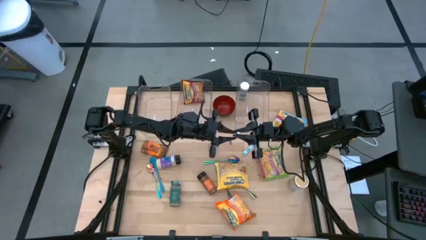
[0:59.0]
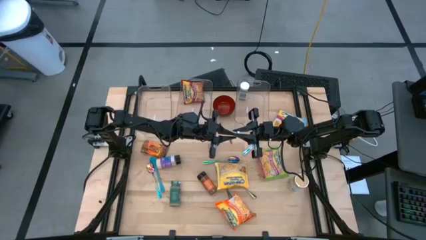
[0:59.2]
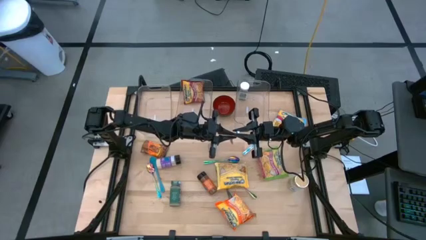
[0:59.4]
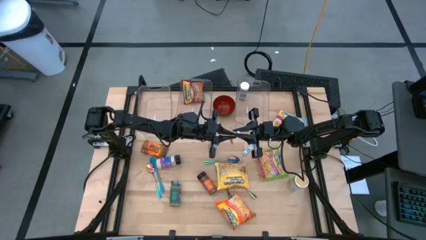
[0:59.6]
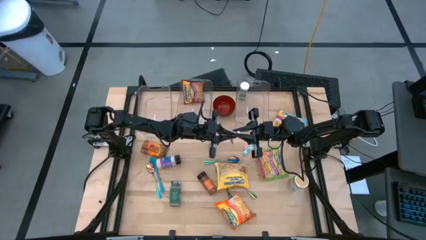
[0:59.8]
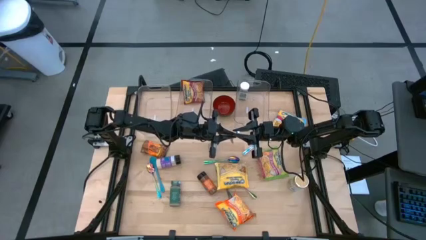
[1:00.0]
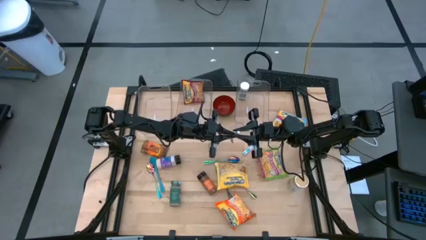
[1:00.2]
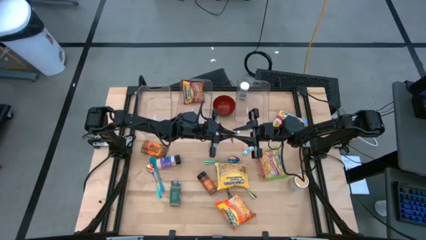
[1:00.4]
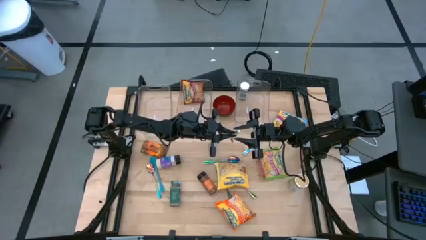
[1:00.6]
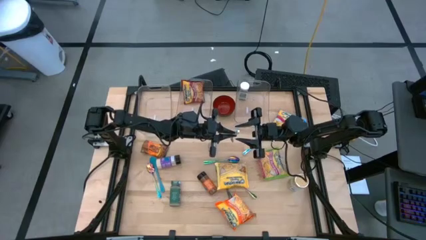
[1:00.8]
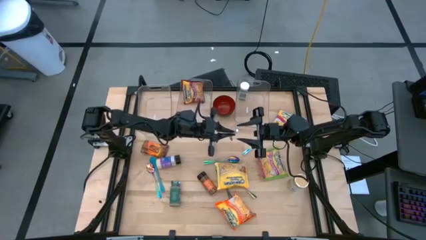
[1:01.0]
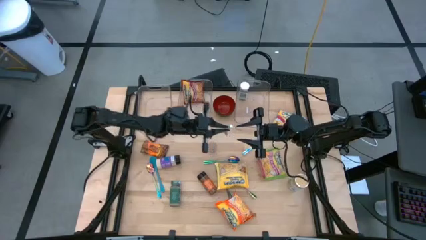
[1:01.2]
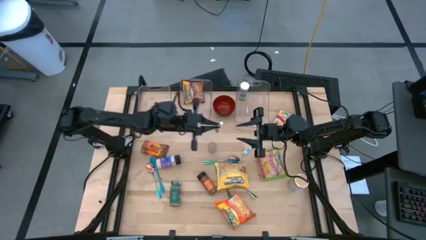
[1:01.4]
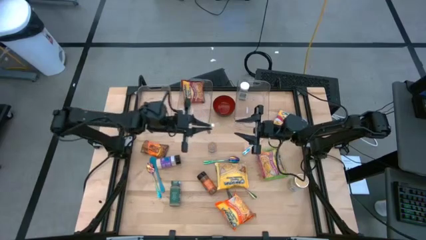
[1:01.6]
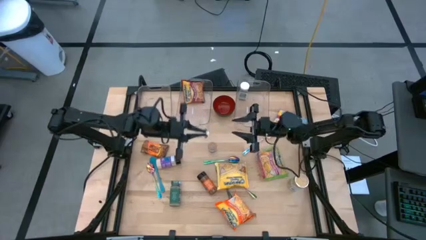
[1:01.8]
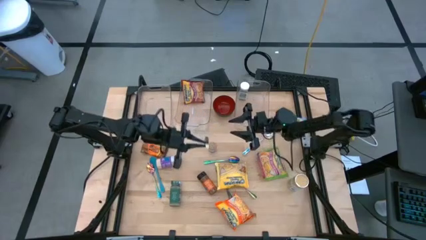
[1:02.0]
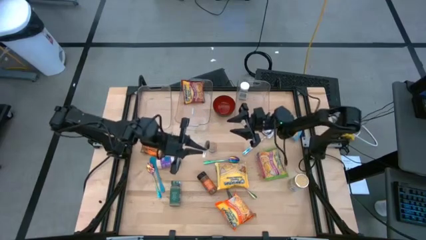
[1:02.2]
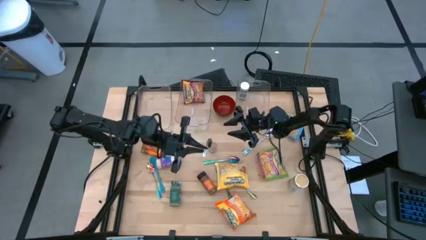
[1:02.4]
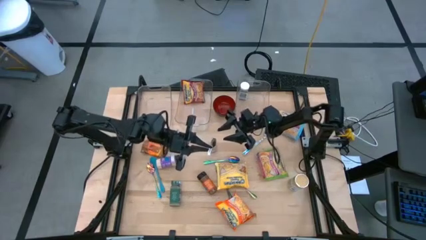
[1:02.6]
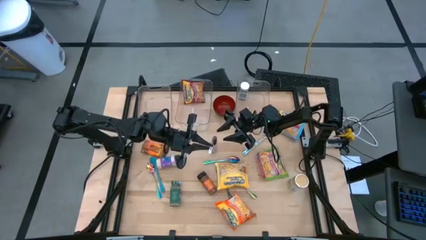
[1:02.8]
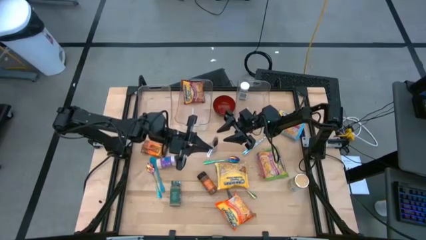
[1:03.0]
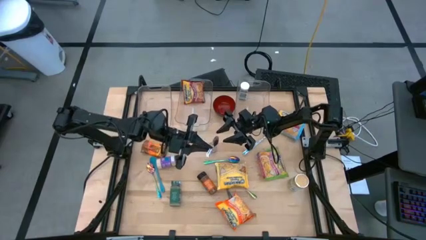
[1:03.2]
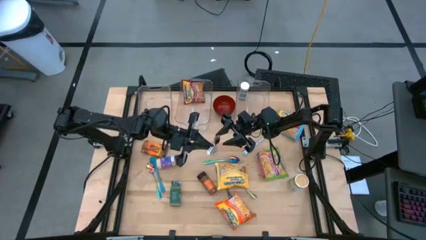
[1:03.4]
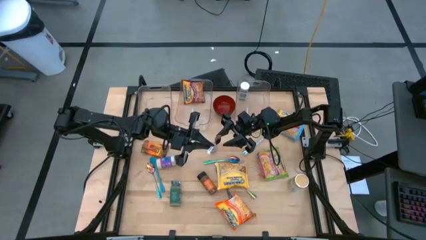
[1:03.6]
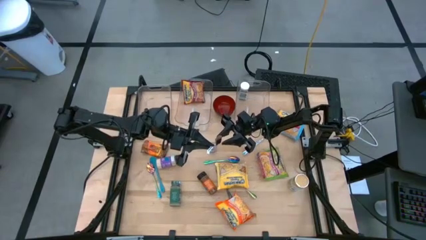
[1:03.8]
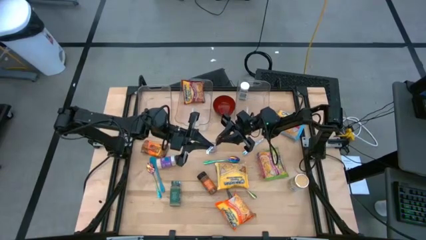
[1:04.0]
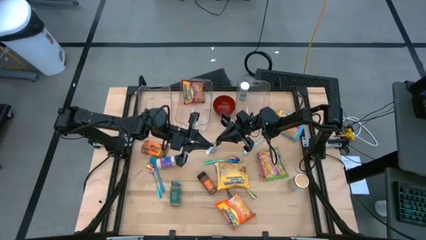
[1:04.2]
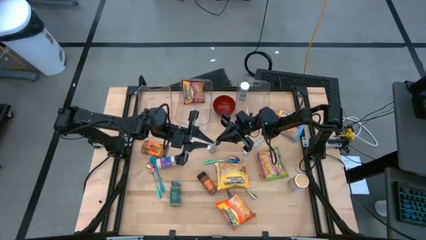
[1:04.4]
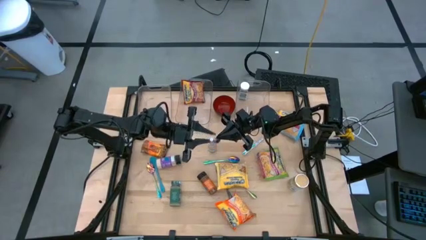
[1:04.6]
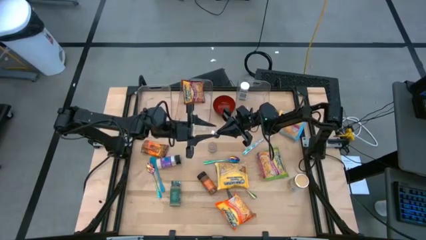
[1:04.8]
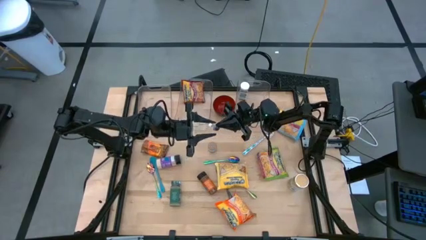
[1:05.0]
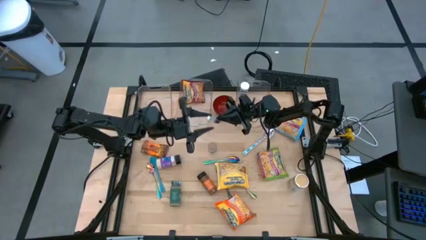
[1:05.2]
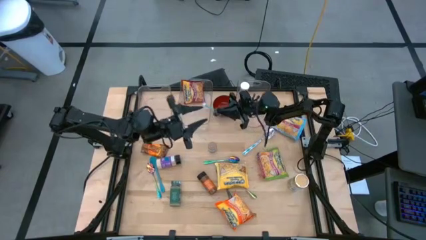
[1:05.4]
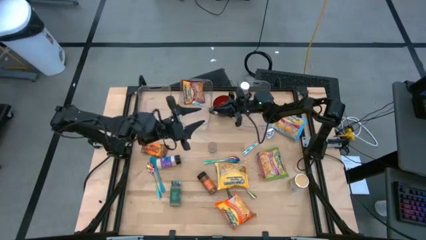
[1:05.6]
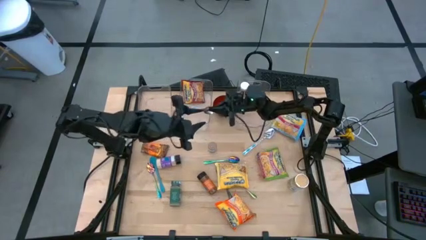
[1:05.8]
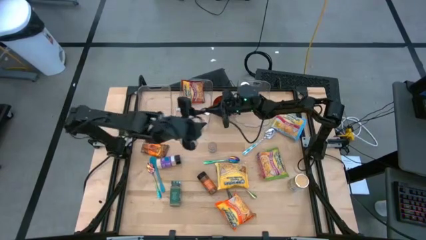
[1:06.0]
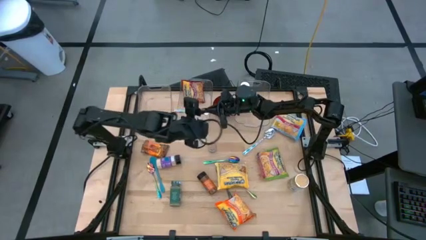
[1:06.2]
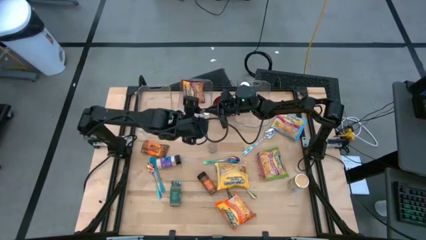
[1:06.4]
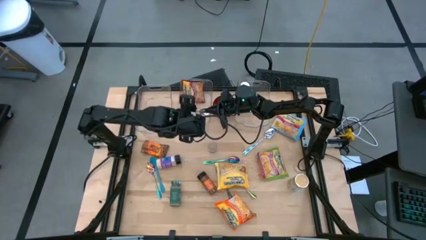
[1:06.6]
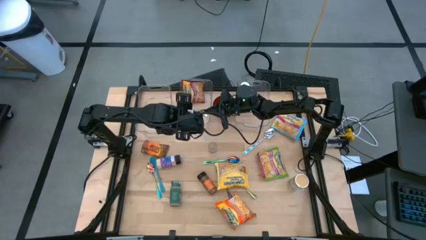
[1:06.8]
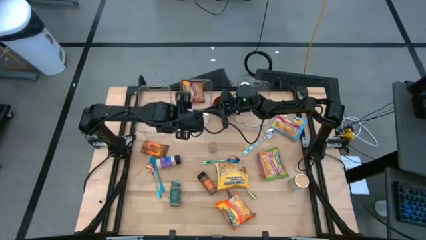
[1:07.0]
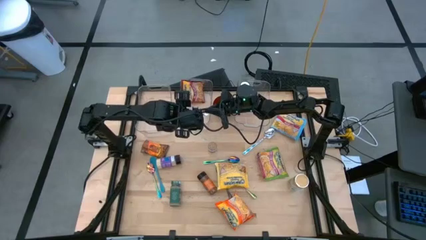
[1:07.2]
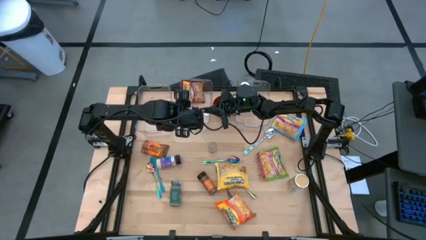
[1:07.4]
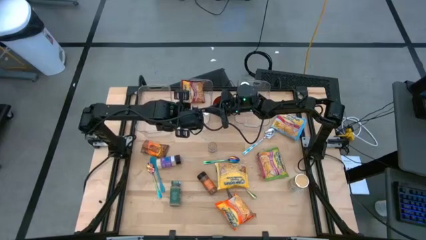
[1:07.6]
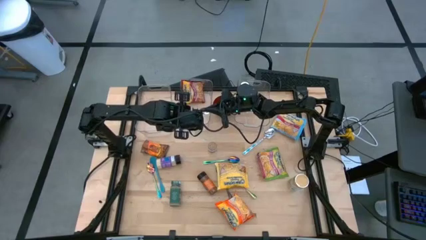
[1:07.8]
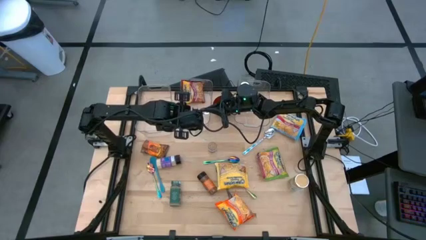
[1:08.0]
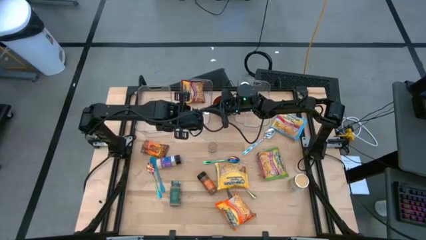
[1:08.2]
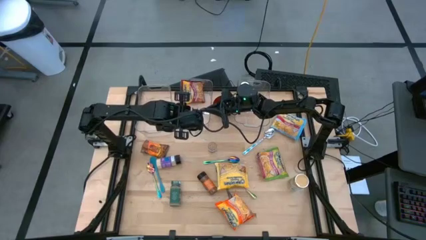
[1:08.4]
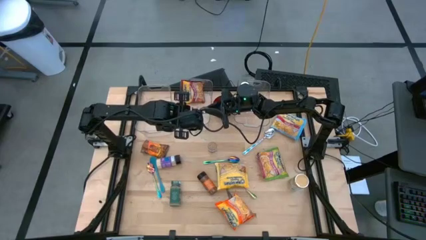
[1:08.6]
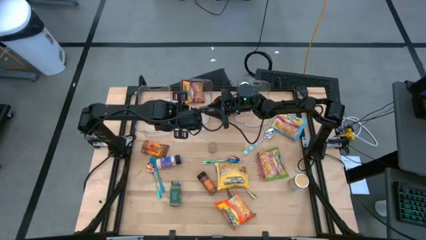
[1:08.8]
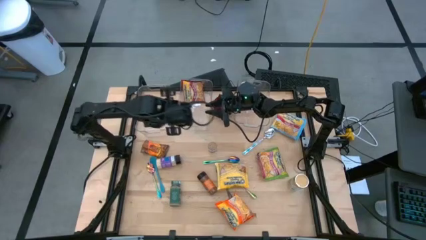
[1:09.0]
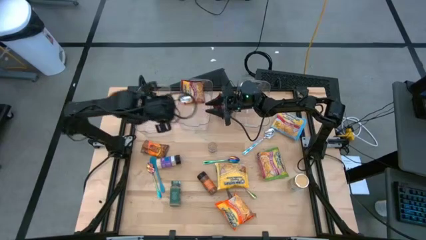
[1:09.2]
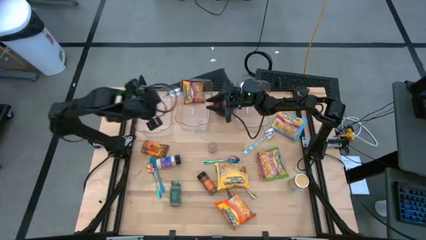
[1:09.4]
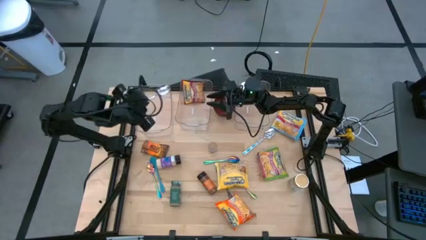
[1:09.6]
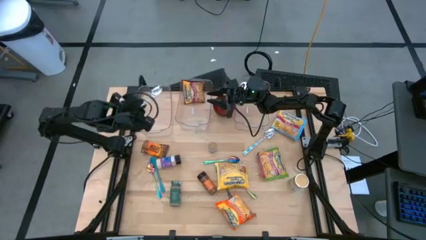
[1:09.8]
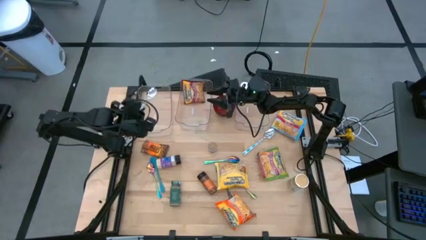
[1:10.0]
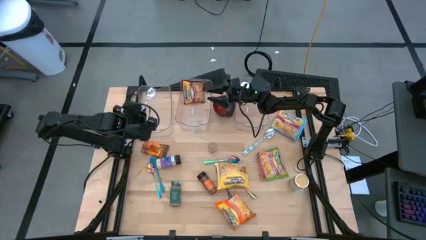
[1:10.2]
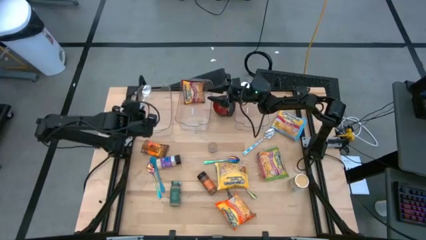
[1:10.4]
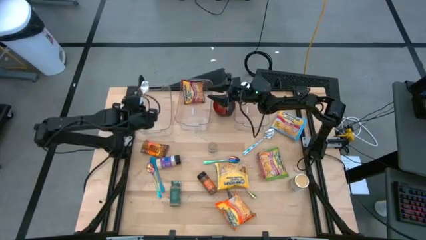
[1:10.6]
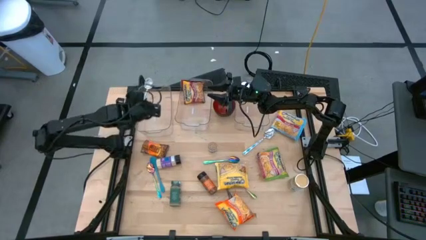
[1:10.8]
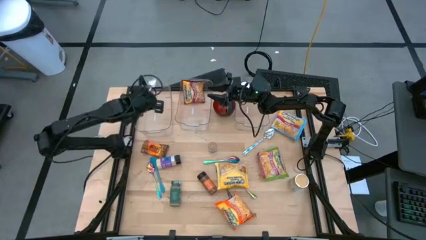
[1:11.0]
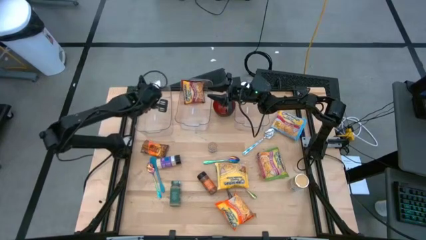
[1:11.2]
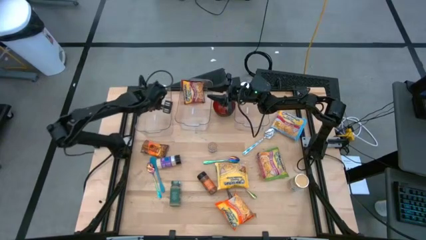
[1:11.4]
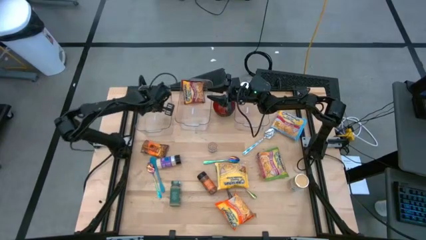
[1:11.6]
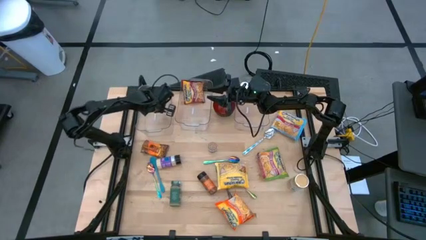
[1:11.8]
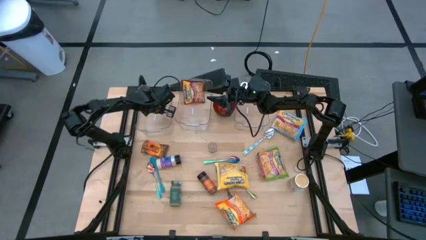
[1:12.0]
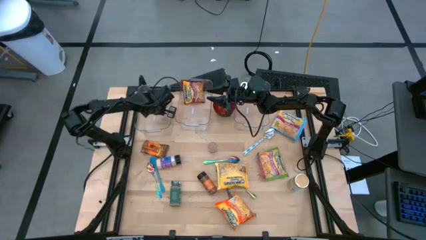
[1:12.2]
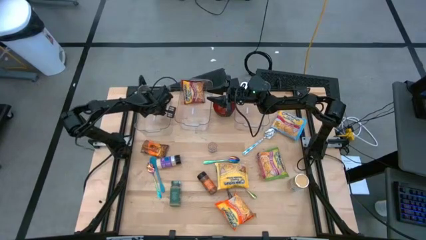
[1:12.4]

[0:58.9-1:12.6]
Task: Pick & Place Food Item
Put the white spoon into the left transparent bin
